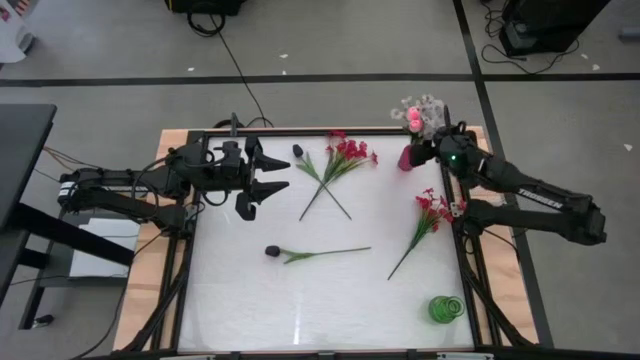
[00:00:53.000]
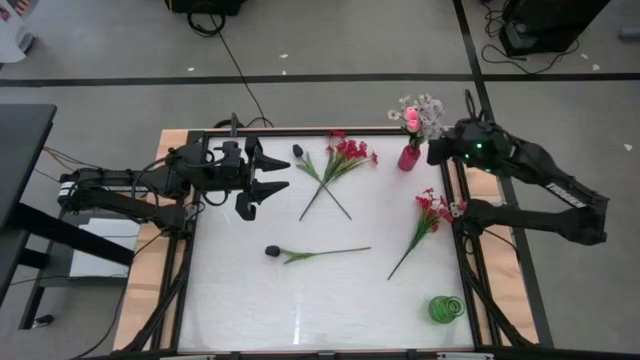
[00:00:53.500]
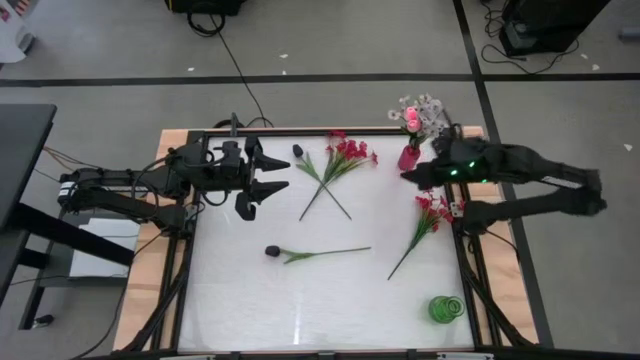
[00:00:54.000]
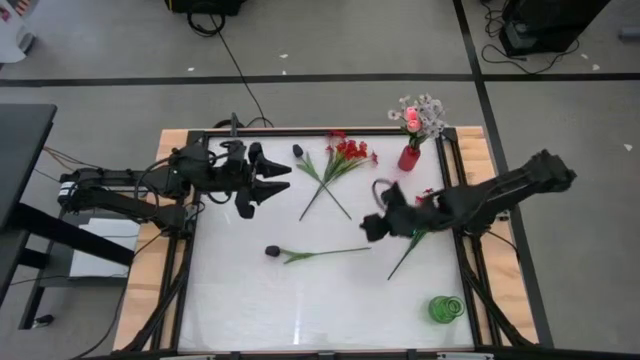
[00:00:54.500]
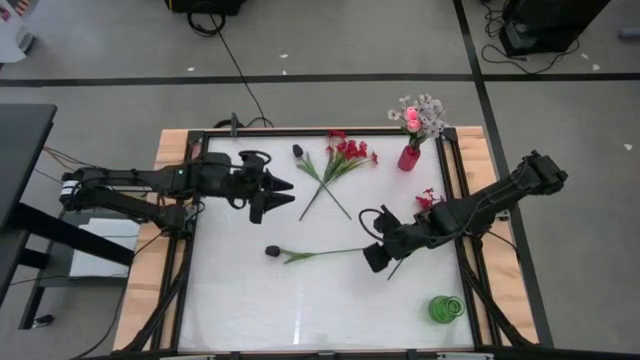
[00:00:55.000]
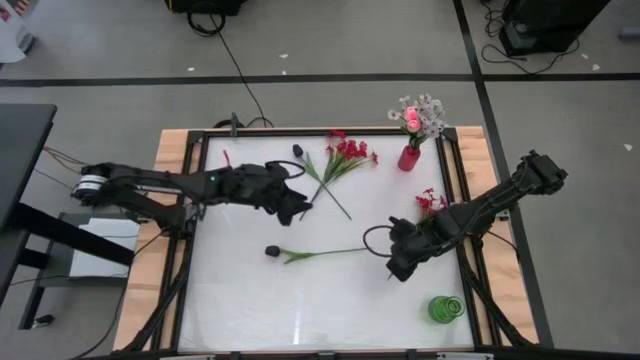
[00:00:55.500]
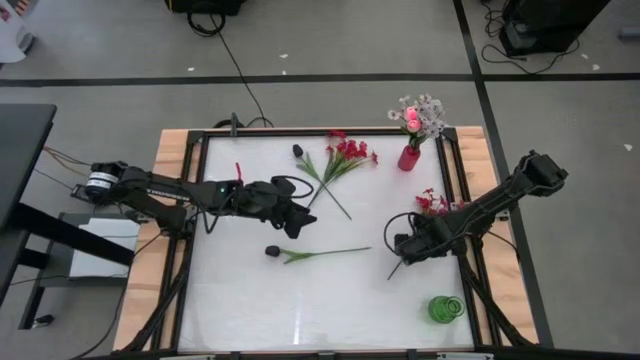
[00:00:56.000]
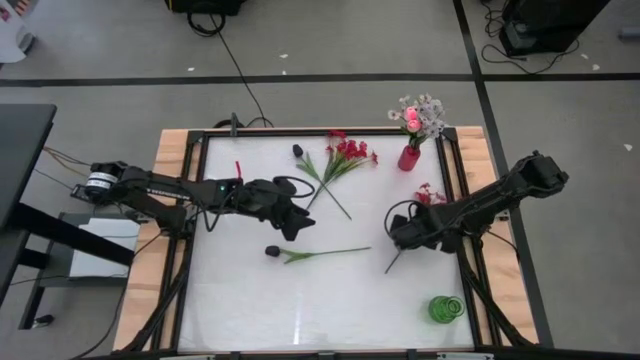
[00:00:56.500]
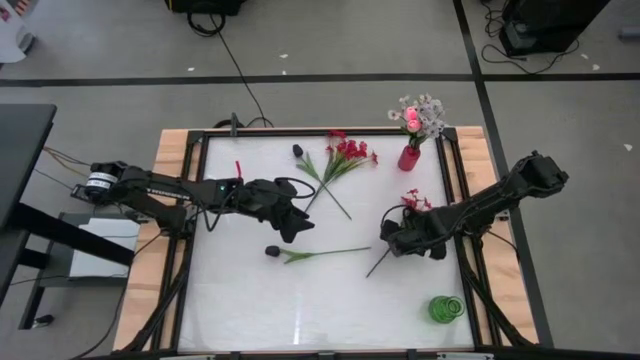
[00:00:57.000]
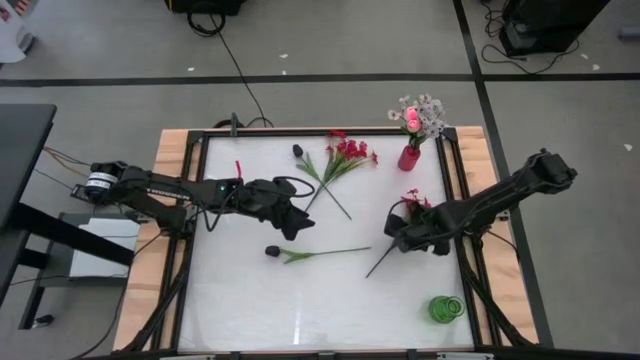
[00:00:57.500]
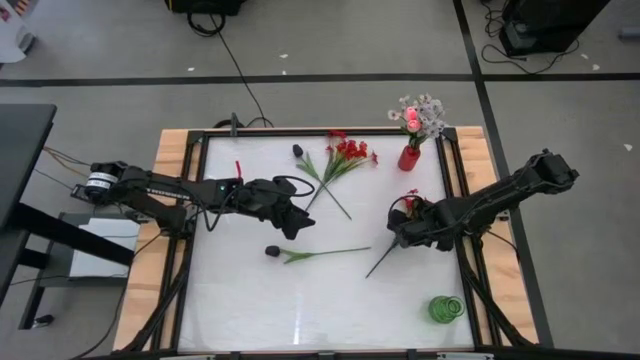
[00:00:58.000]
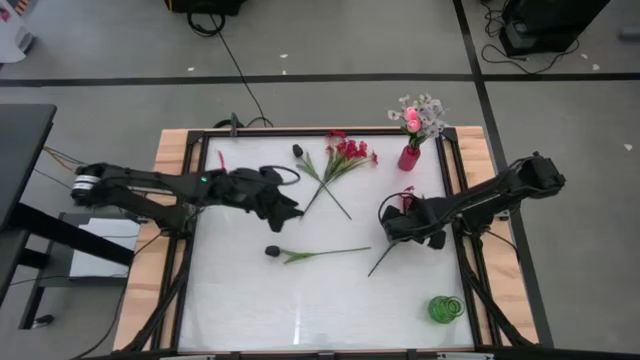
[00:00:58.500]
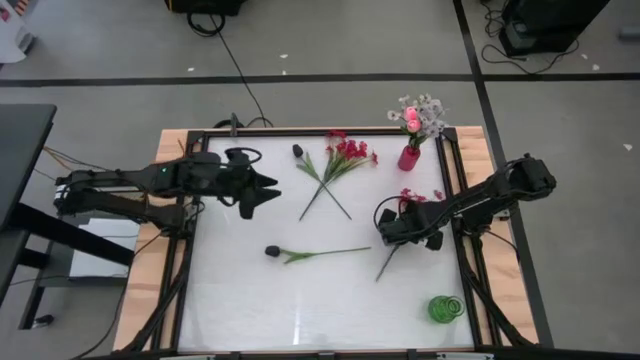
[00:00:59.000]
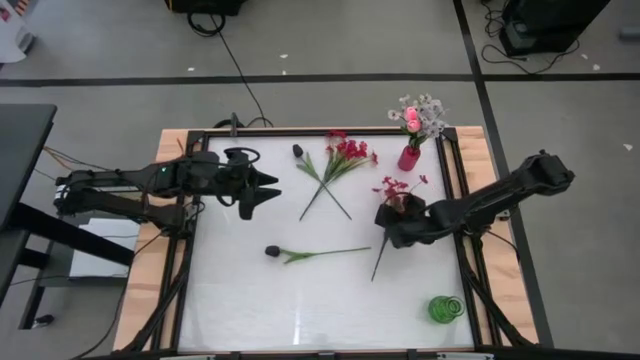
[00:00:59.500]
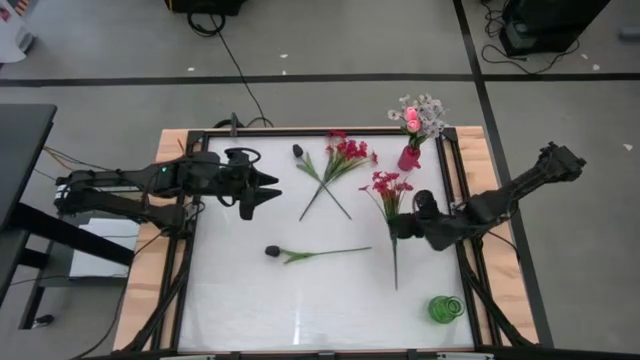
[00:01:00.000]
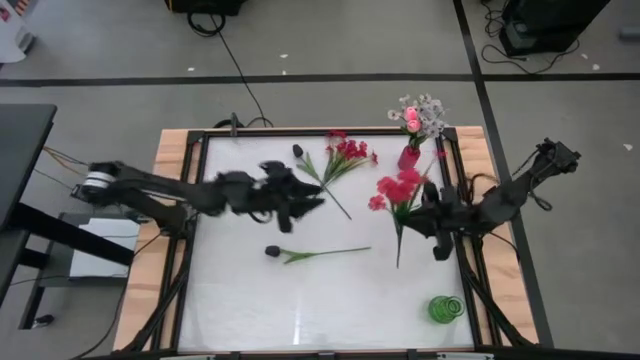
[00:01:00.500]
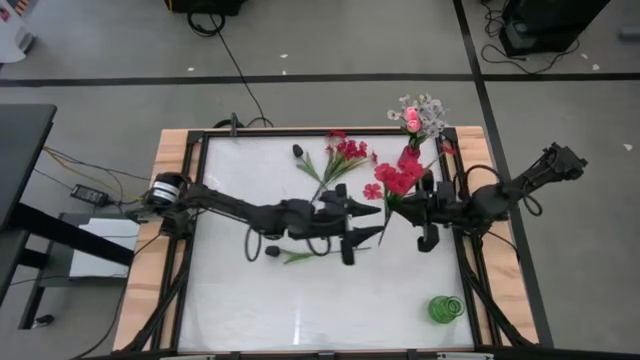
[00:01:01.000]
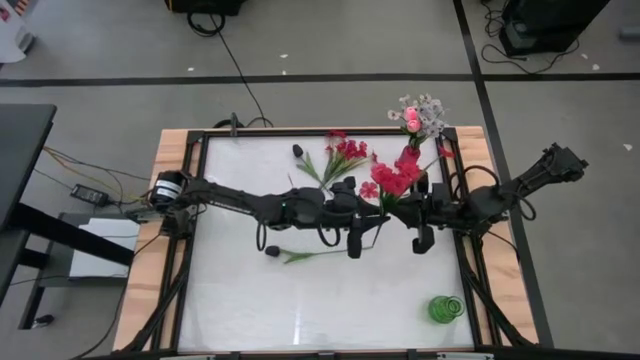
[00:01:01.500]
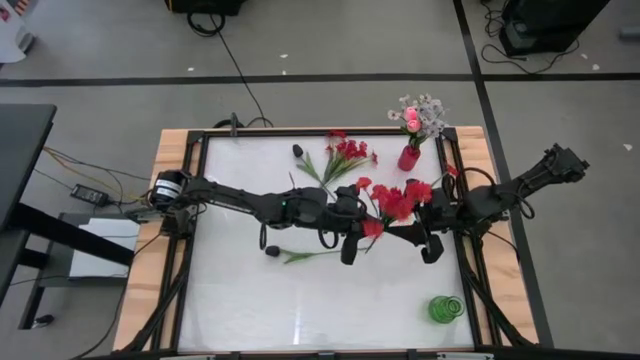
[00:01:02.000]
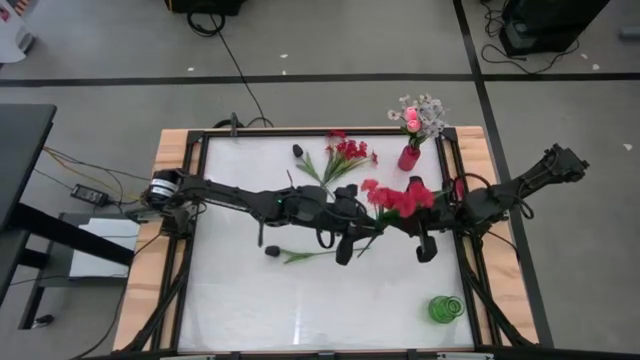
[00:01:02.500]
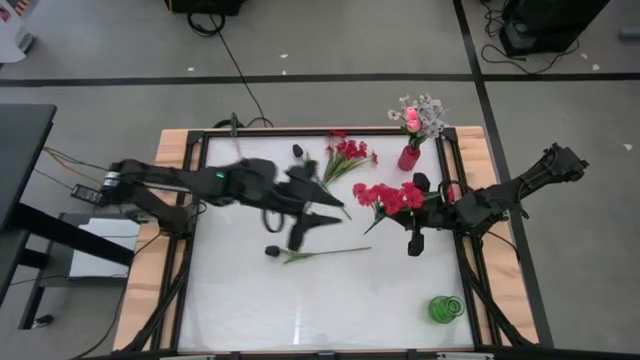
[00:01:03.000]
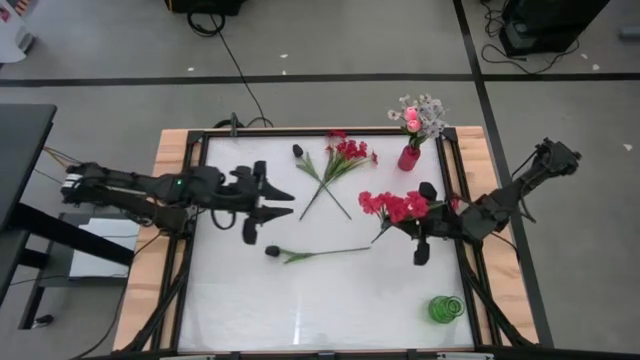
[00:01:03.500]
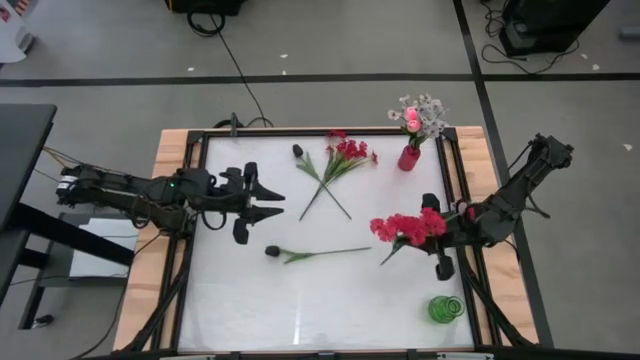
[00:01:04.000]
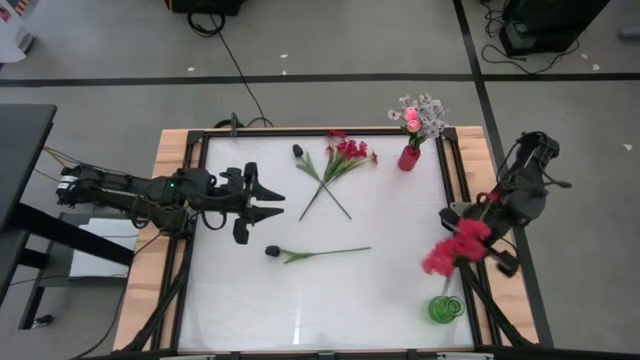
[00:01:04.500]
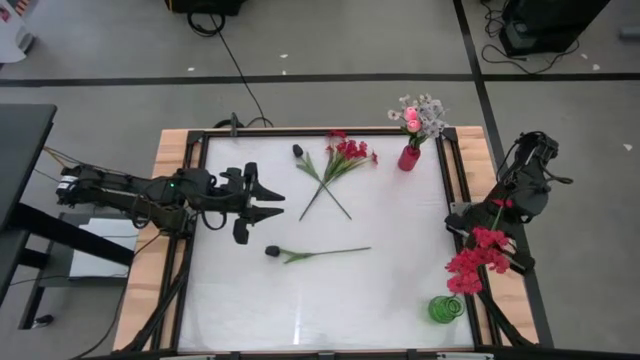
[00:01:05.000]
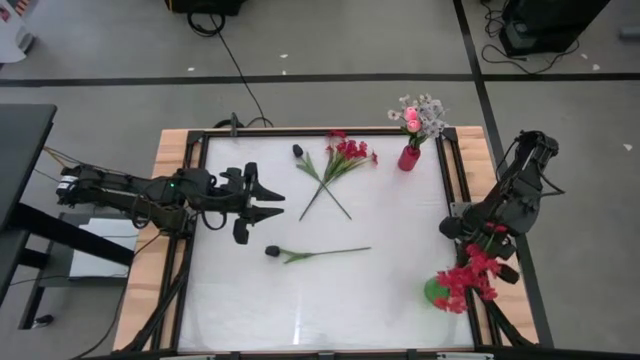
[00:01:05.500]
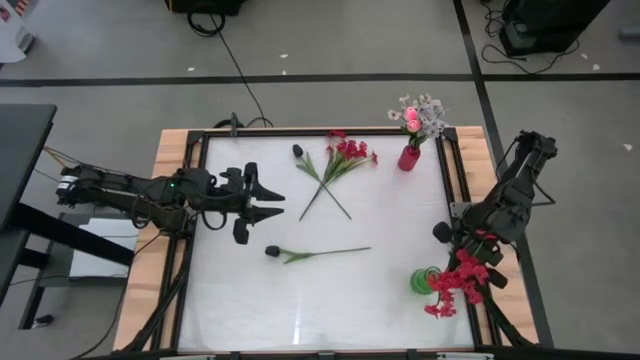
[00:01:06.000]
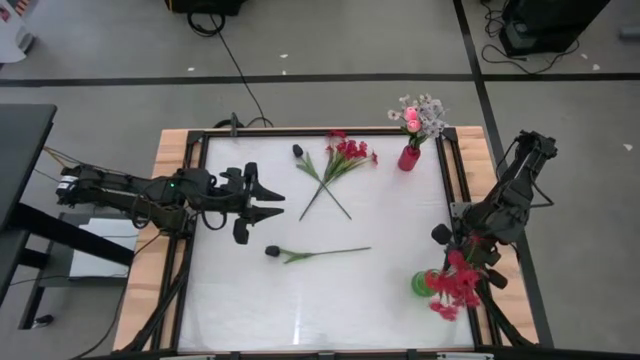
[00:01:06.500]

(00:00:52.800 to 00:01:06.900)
Task: Sort flowers into vase by color
Put the right red flowers into the green vase
